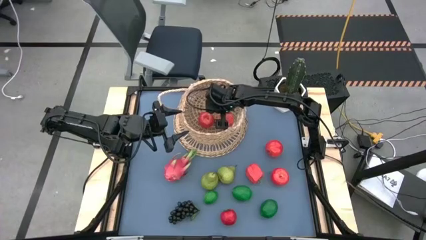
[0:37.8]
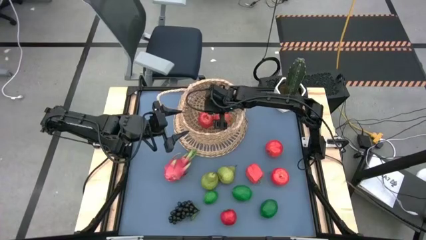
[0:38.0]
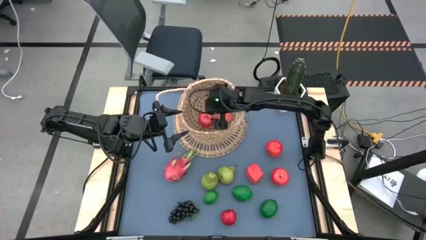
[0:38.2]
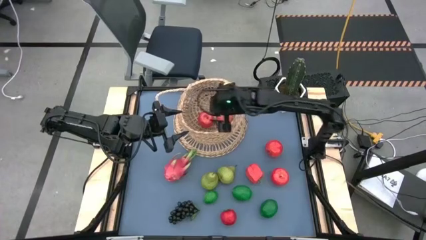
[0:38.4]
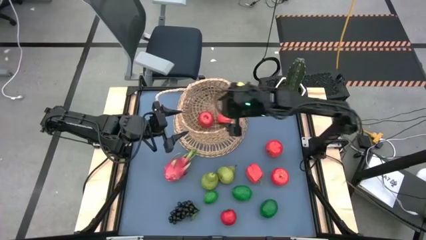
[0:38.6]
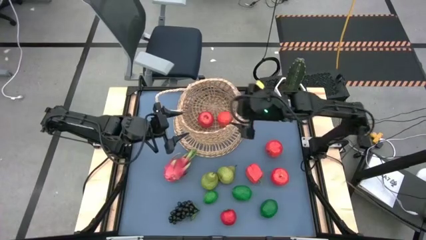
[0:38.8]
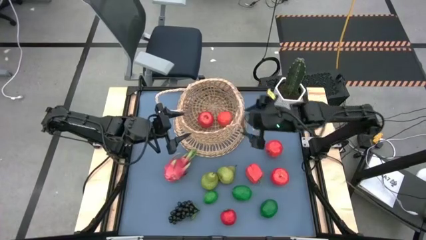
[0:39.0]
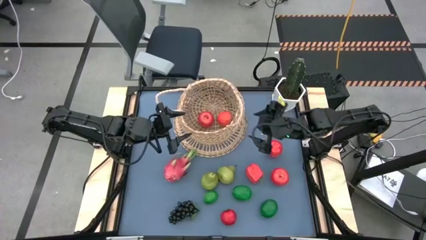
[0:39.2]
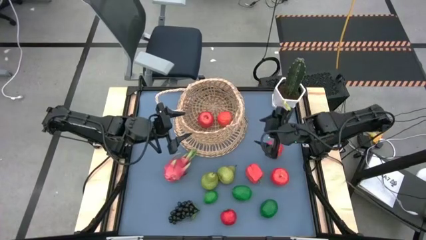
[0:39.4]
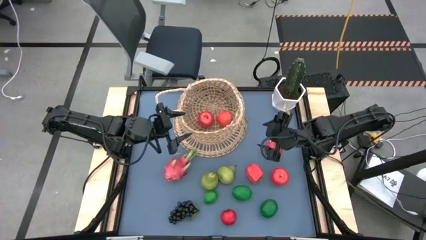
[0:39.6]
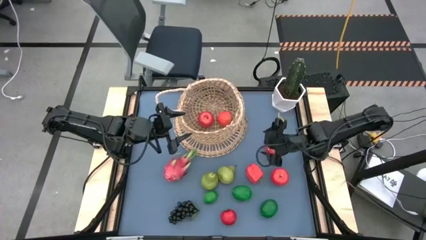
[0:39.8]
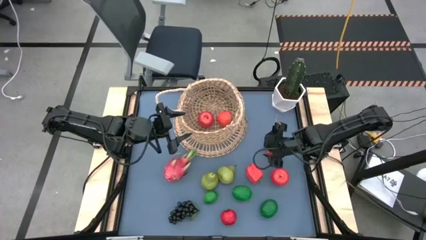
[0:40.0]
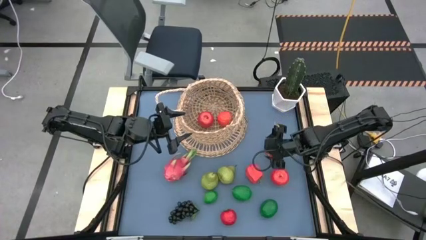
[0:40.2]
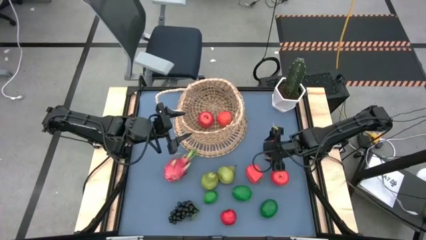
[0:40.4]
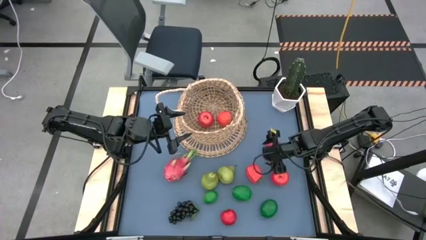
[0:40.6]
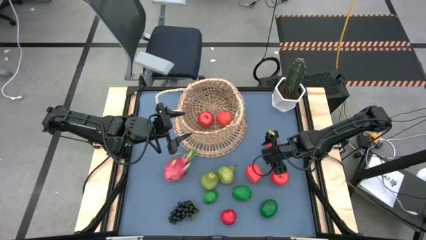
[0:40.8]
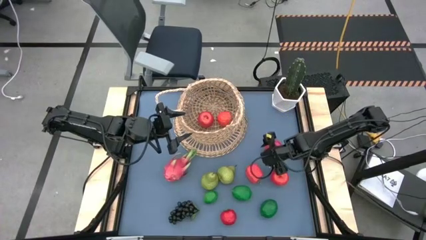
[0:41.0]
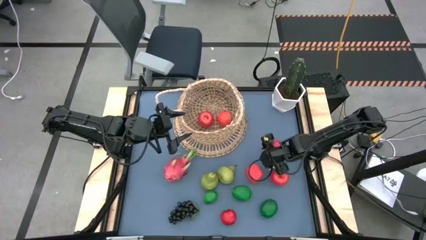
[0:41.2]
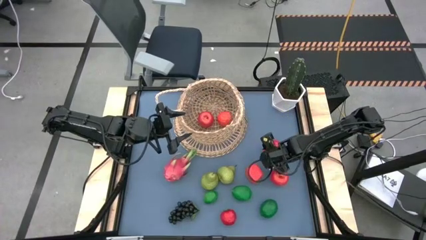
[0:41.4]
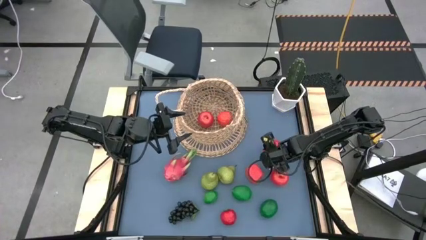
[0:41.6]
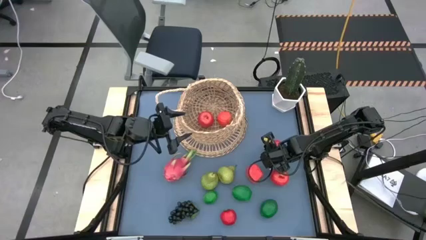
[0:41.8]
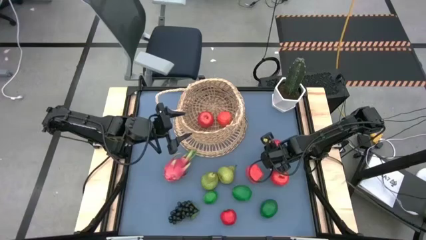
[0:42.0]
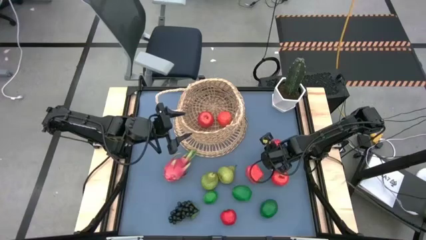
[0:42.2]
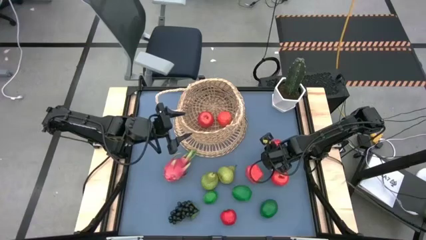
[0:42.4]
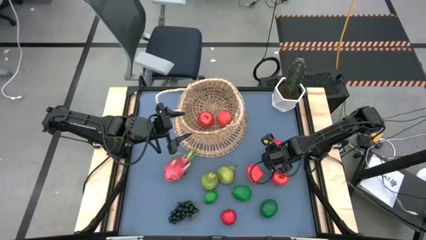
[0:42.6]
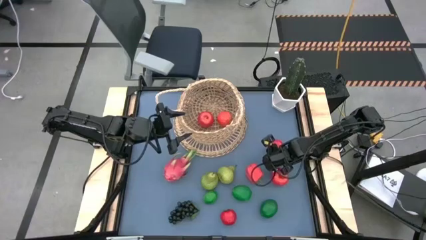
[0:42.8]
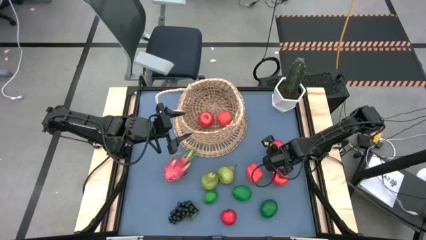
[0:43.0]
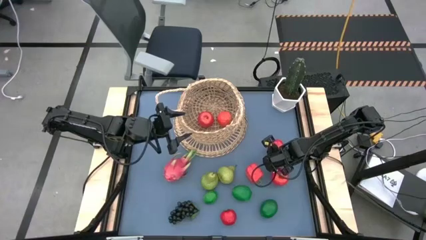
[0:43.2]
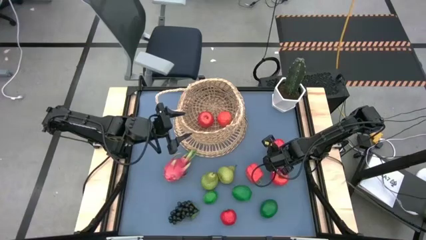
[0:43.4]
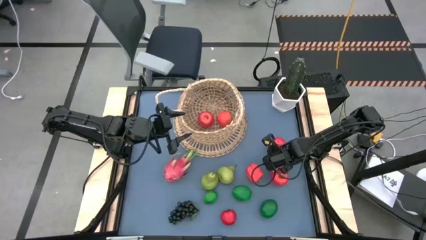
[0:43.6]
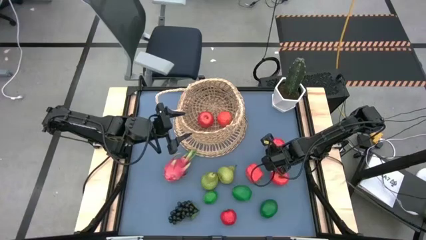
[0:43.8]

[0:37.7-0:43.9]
Task: Build produce basket
Put the apple into the basket

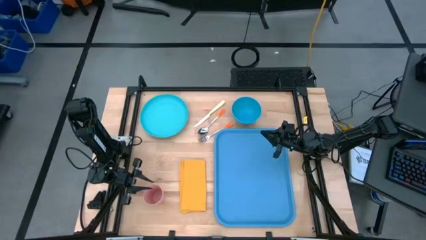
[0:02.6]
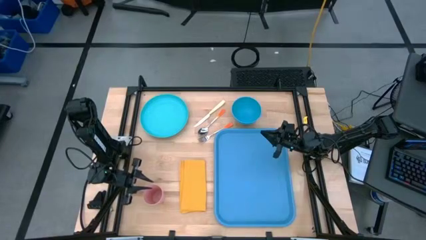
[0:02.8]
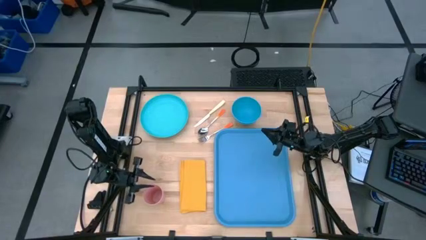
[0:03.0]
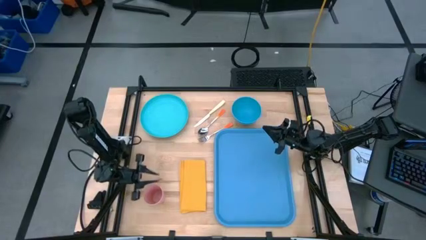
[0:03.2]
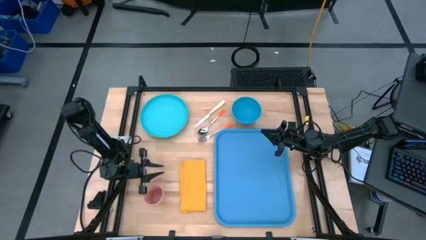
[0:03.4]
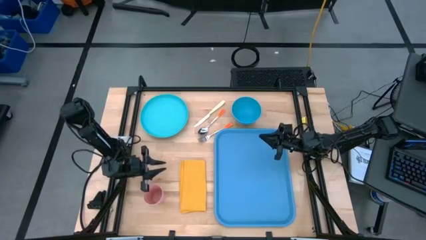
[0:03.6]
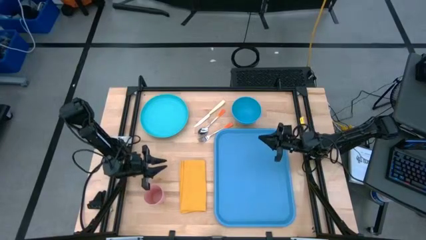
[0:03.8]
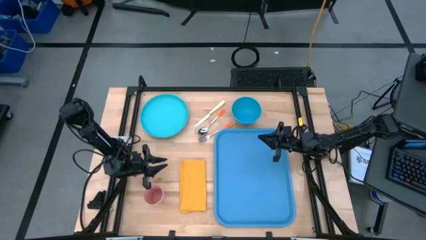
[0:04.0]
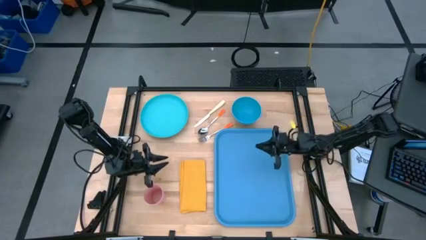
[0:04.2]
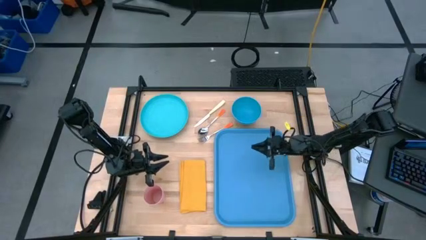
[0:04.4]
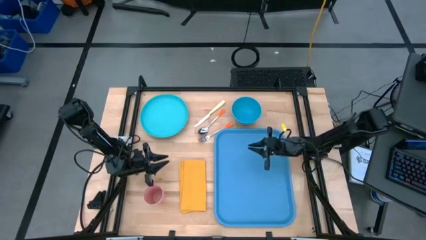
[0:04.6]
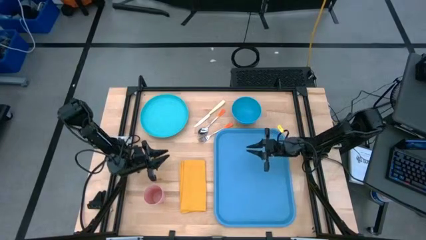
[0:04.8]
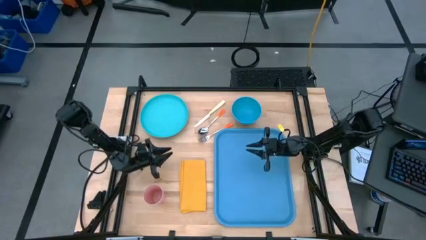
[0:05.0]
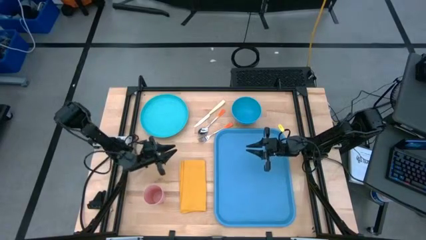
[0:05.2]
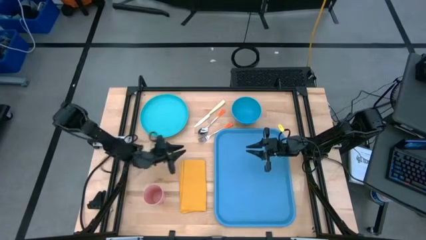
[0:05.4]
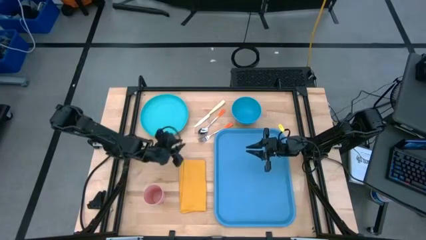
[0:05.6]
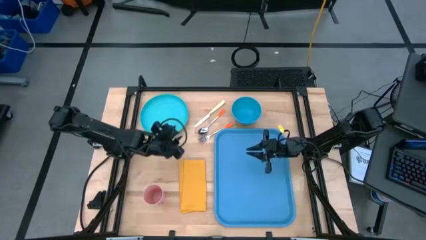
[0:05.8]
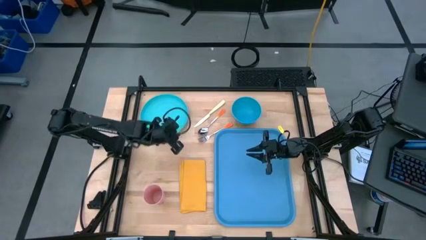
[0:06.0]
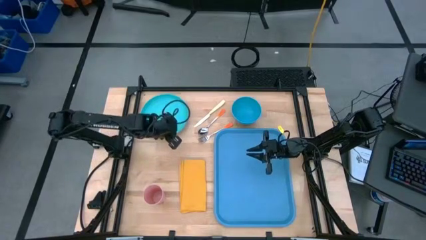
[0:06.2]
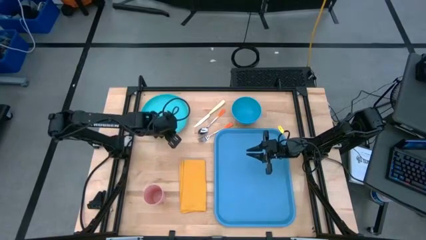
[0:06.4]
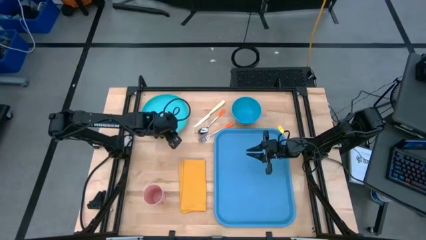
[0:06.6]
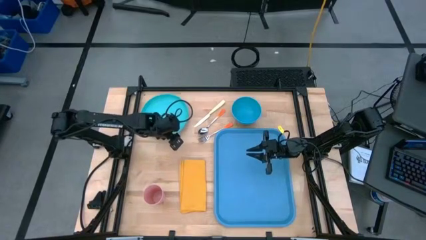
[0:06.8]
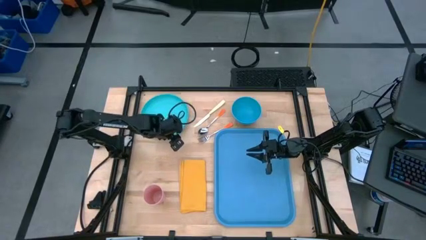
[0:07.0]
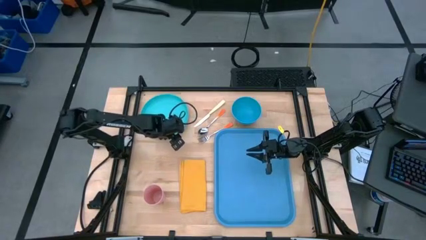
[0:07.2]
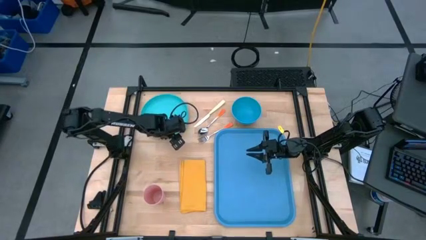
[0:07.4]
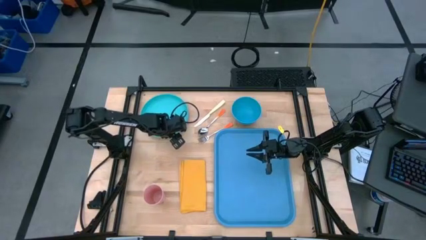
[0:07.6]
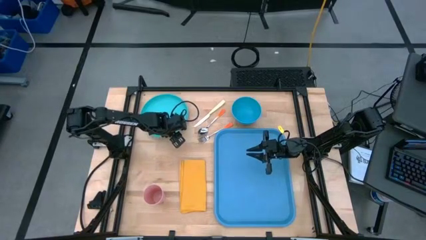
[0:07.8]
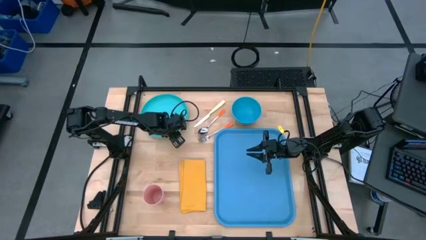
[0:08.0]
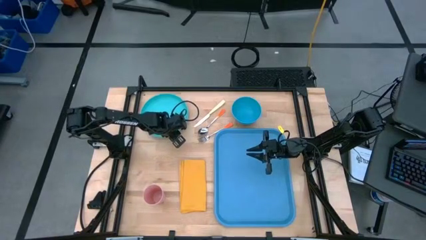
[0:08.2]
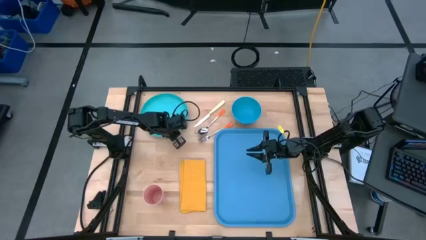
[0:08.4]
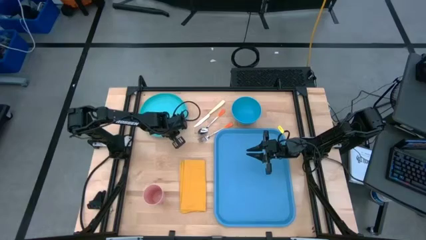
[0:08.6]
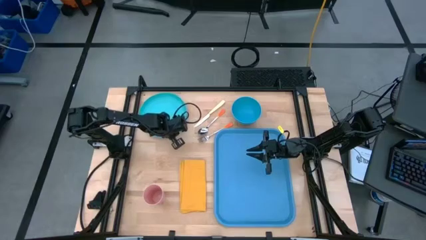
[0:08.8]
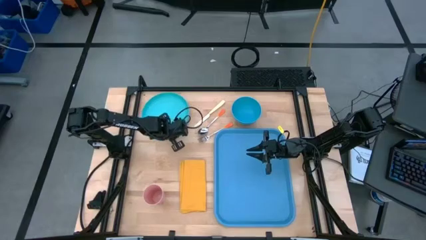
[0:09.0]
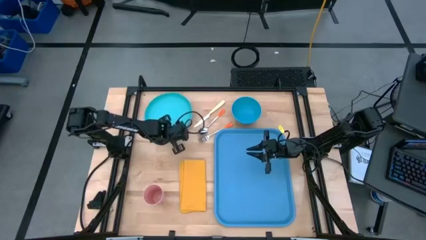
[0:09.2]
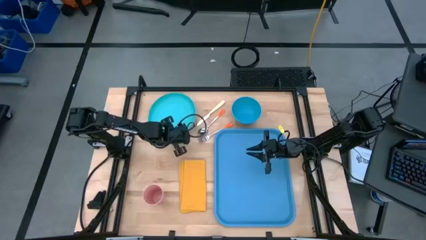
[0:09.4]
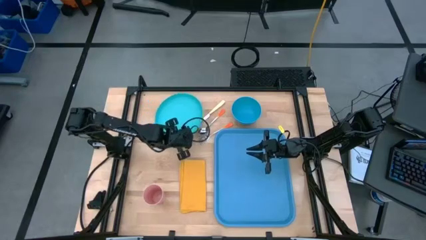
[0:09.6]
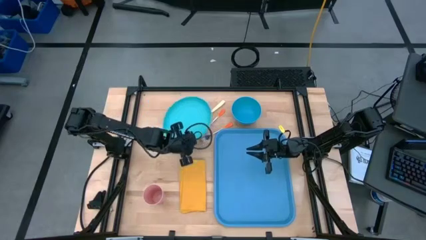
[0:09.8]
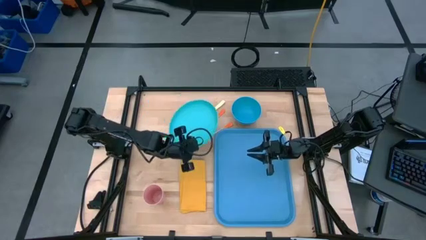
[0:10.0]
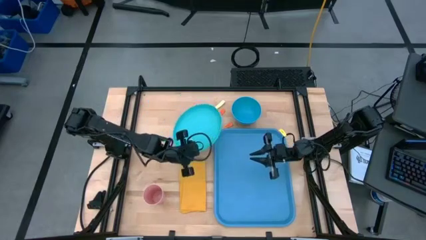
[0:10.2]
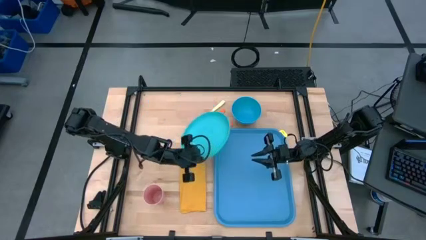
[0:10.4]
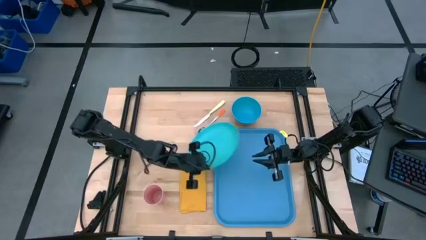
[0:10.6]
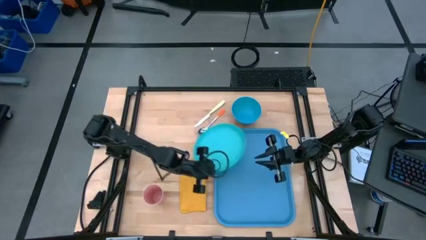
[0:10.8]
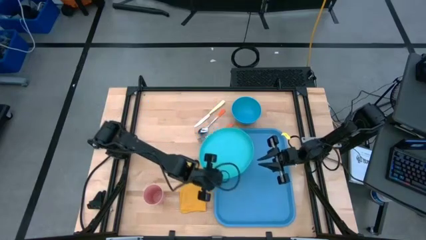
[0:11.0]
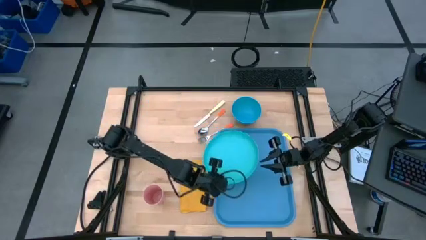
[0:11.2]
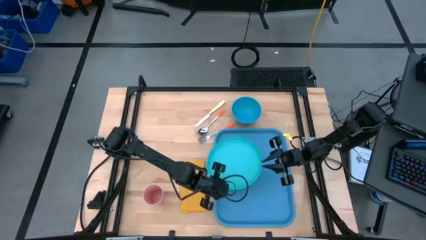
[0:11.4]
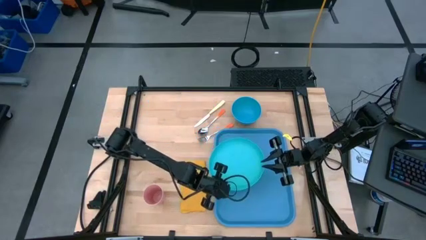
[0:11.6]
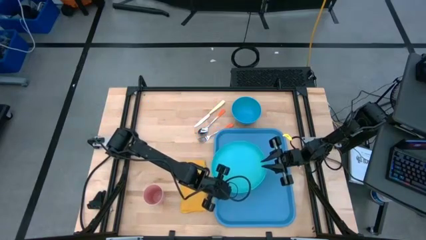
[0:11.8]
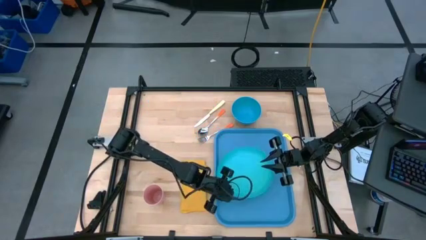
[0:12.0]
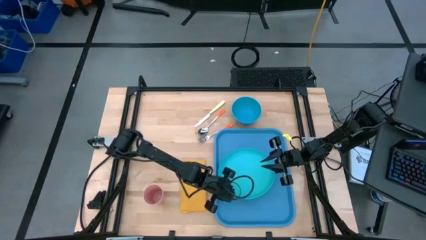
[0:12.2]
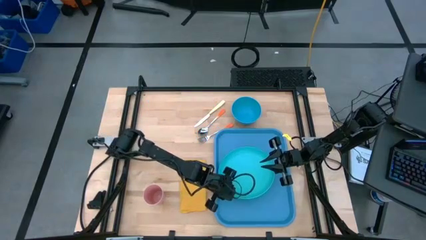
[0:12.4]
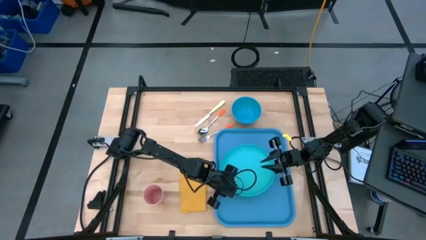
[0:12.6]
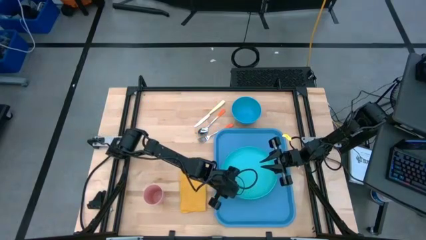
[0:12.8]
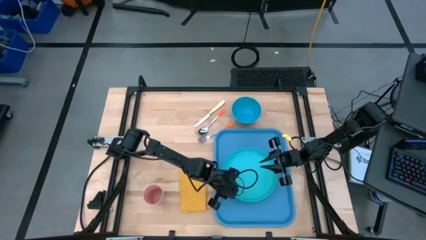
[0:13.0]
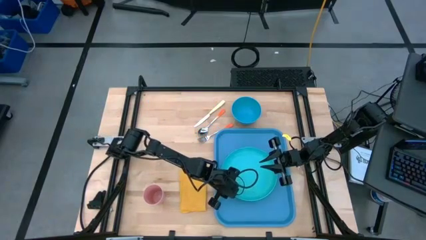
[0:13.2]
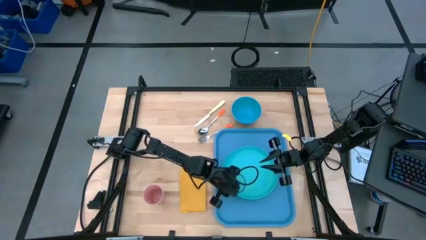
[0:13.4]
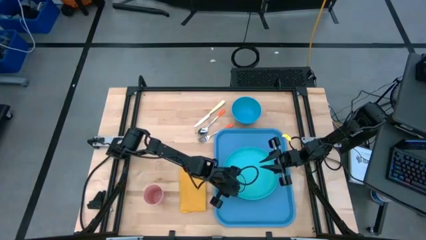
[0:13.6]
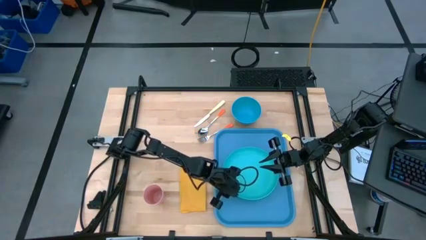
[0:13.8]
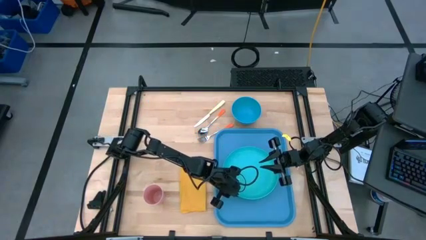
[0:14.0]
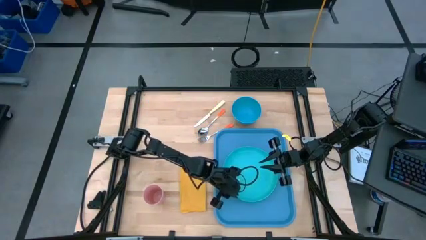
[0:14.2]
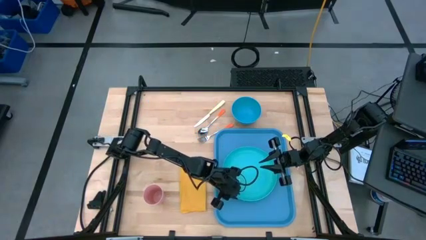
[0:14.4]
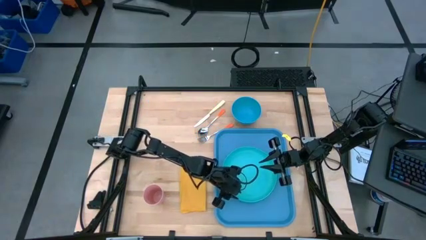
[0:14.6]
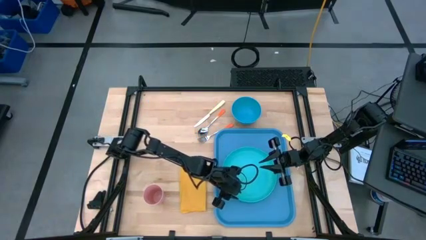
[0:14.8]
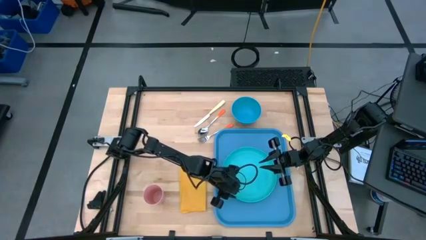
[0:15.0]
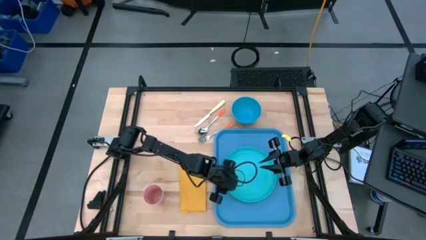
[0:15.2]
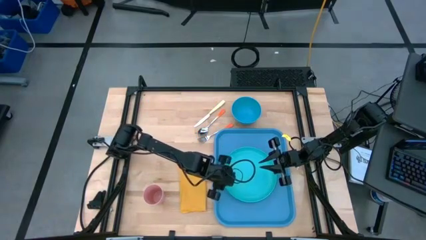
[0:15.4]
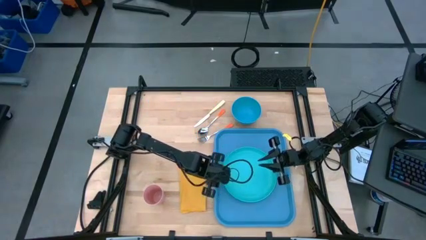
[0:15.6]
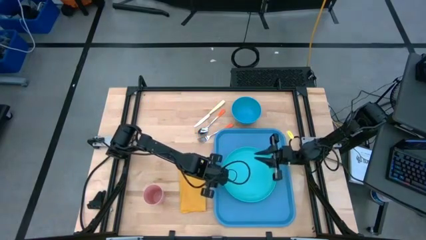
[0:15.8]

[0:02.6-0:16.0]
Task: Set up tray
Put the light blue plate on the blue tray
